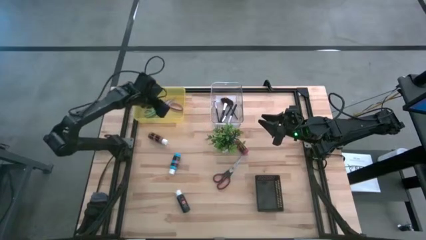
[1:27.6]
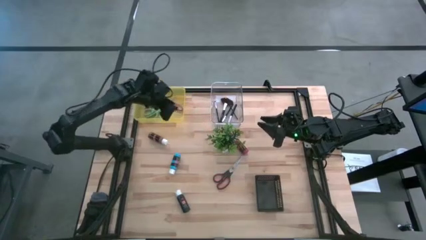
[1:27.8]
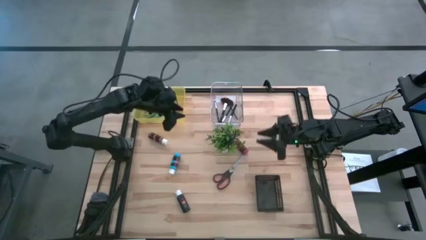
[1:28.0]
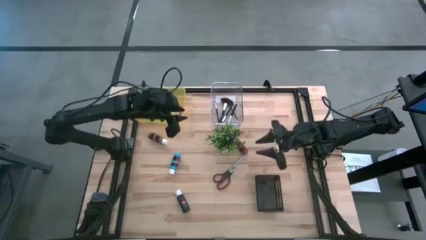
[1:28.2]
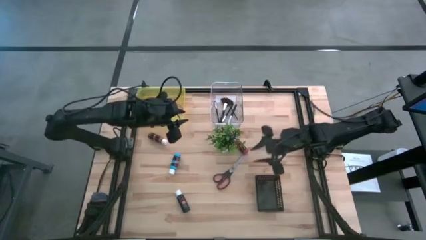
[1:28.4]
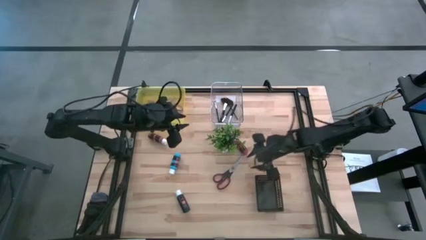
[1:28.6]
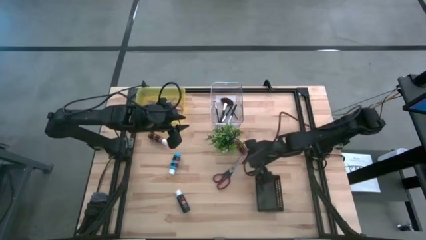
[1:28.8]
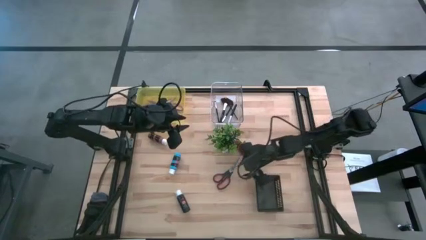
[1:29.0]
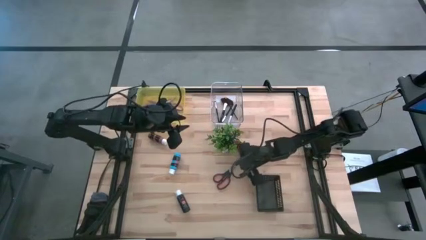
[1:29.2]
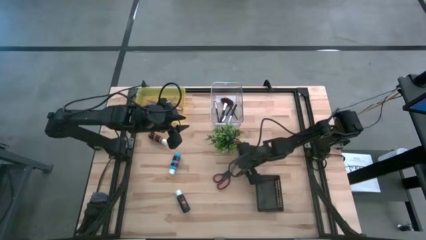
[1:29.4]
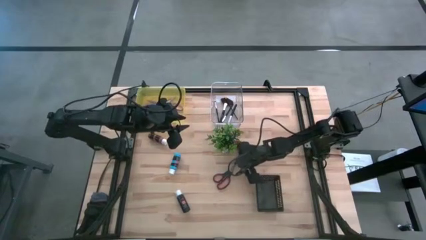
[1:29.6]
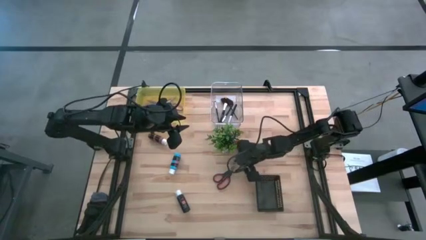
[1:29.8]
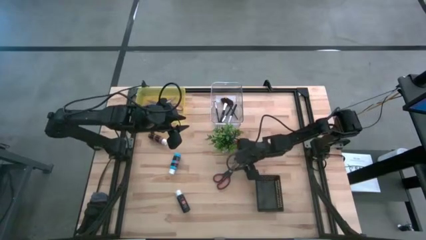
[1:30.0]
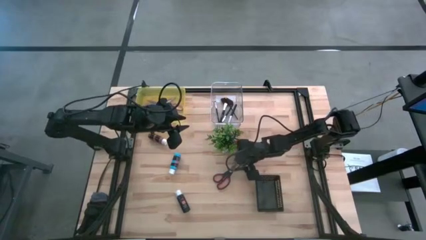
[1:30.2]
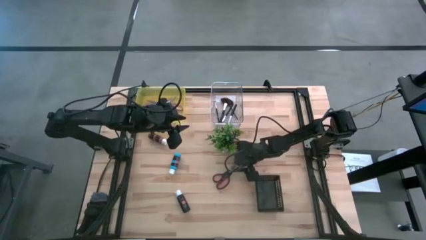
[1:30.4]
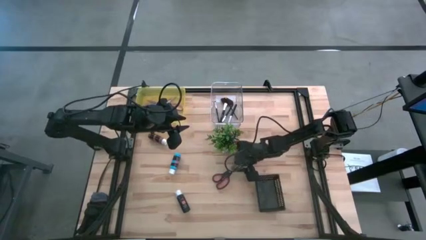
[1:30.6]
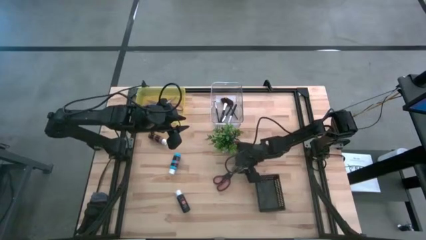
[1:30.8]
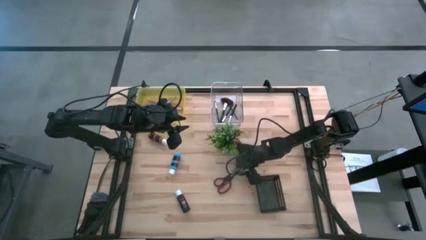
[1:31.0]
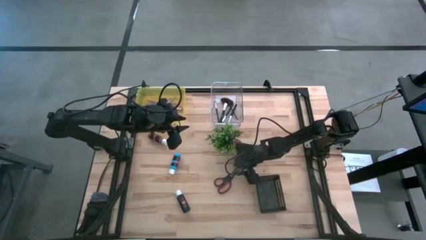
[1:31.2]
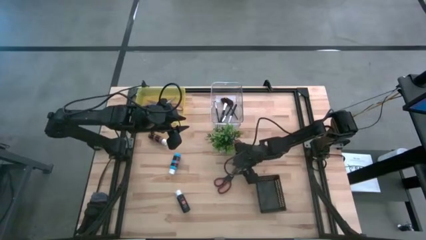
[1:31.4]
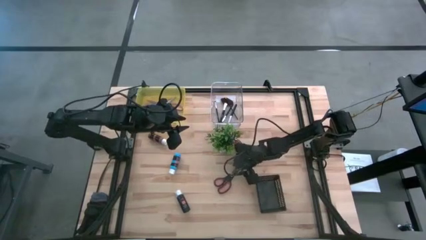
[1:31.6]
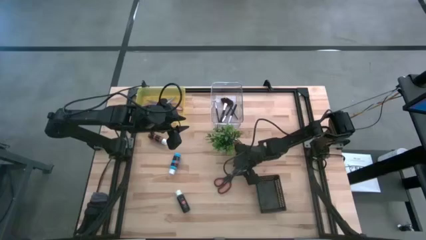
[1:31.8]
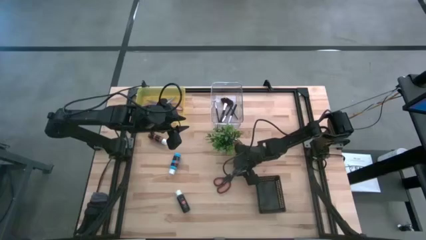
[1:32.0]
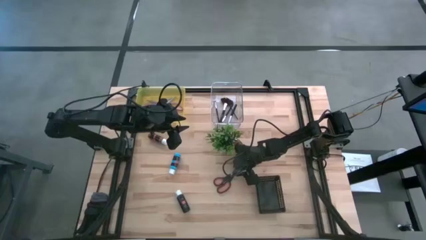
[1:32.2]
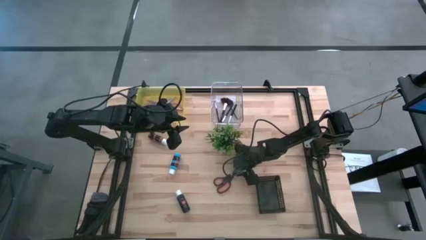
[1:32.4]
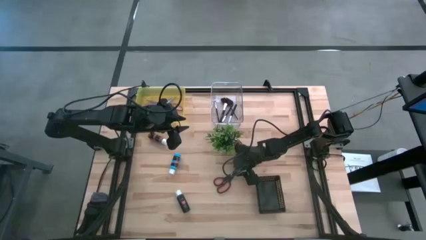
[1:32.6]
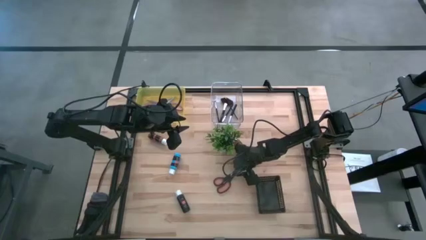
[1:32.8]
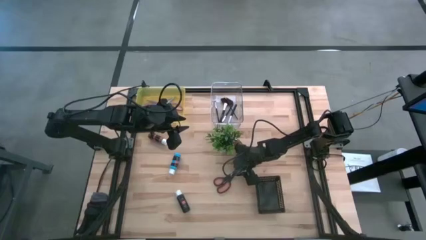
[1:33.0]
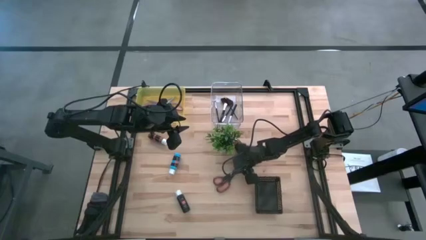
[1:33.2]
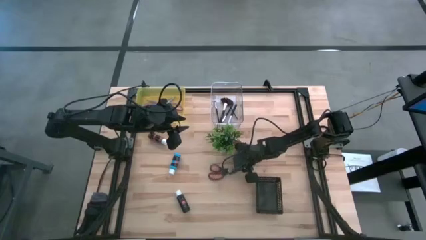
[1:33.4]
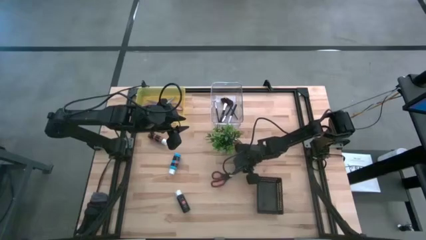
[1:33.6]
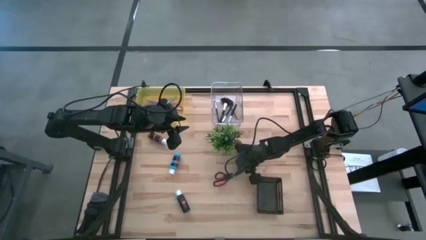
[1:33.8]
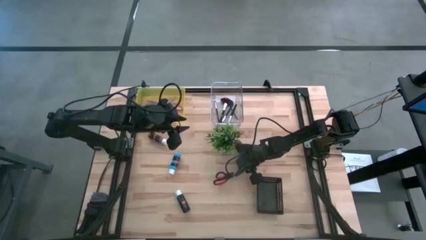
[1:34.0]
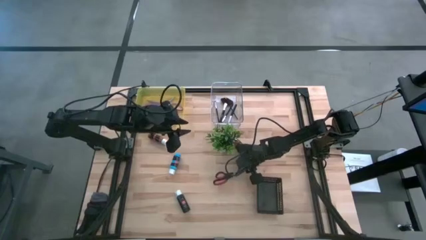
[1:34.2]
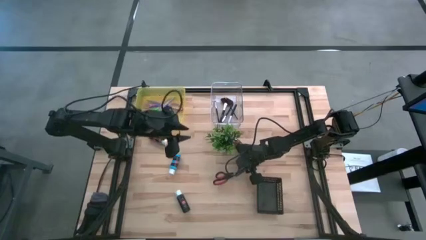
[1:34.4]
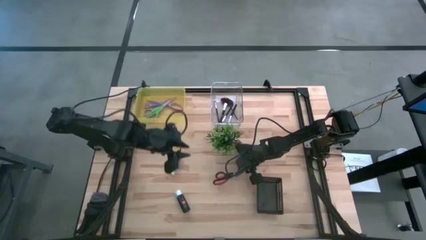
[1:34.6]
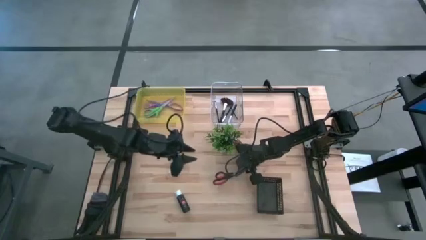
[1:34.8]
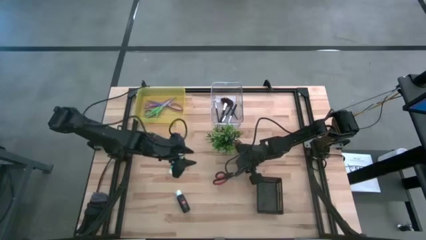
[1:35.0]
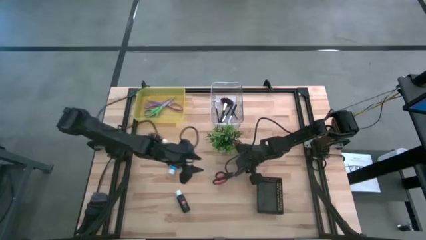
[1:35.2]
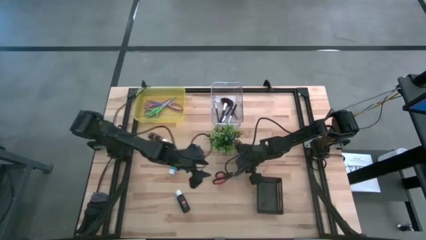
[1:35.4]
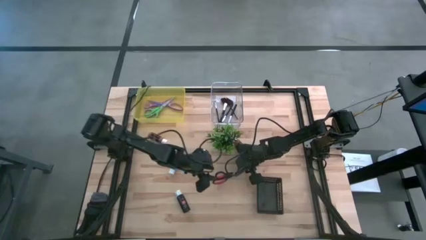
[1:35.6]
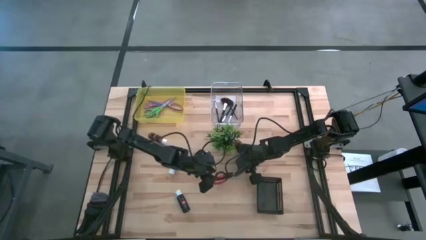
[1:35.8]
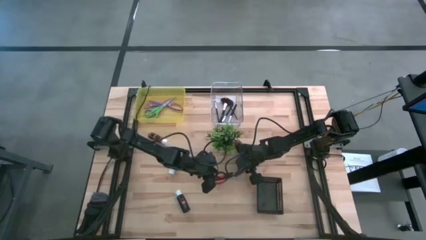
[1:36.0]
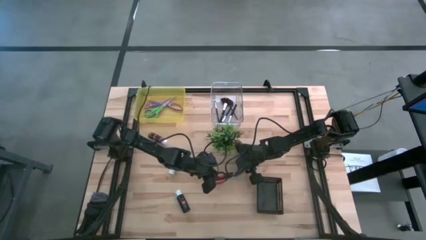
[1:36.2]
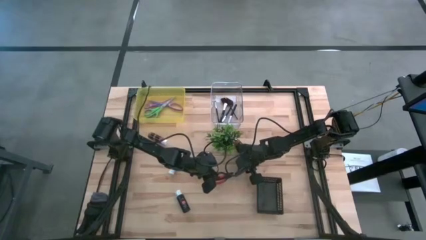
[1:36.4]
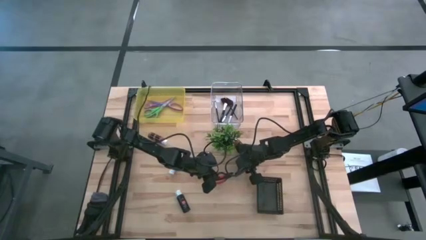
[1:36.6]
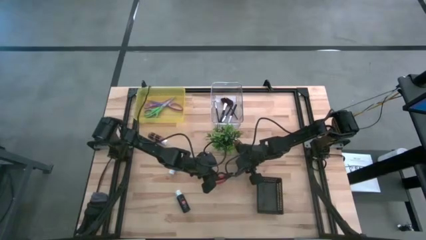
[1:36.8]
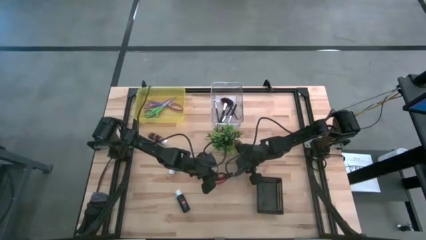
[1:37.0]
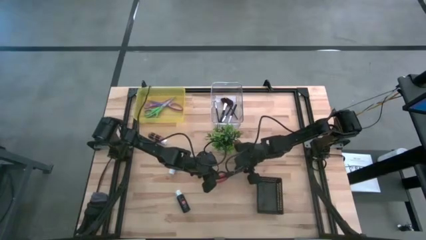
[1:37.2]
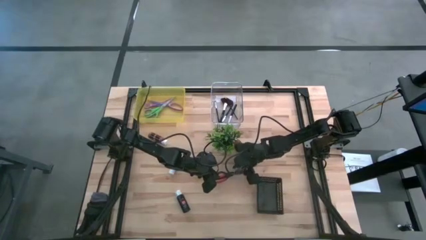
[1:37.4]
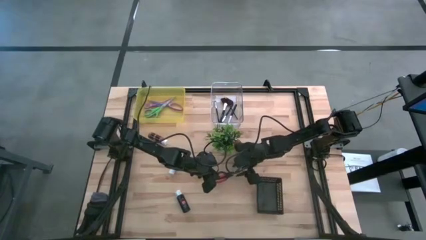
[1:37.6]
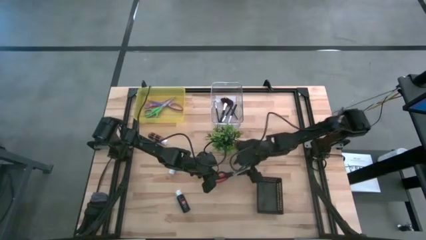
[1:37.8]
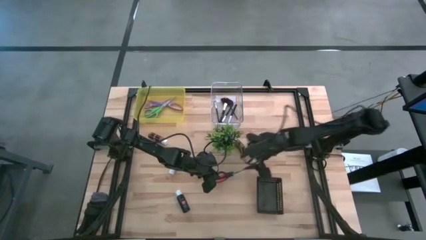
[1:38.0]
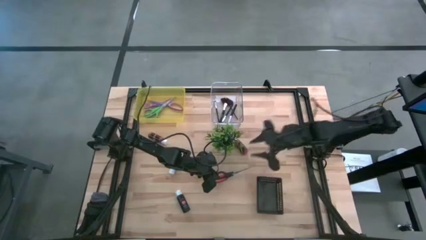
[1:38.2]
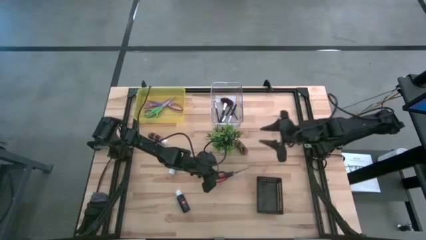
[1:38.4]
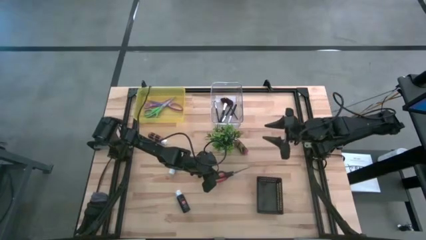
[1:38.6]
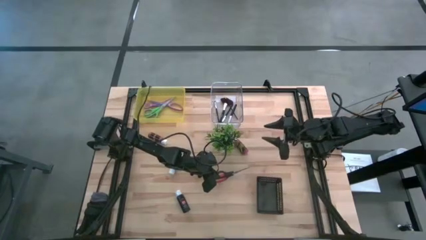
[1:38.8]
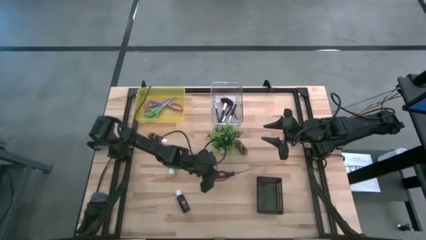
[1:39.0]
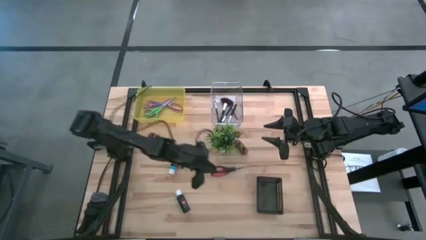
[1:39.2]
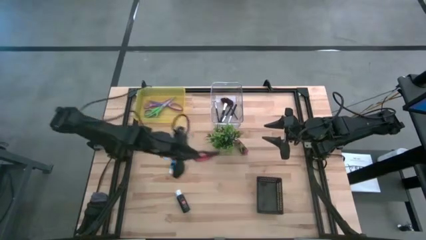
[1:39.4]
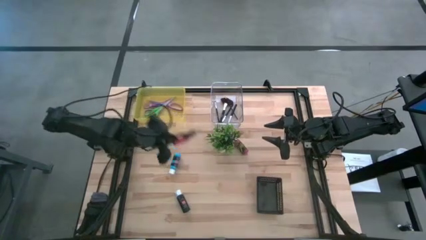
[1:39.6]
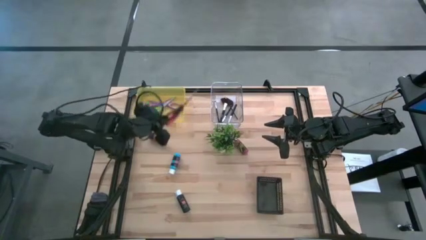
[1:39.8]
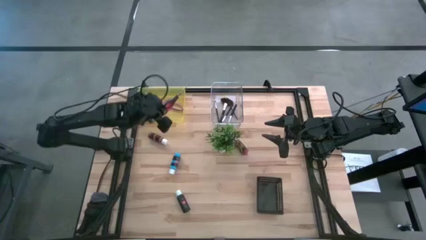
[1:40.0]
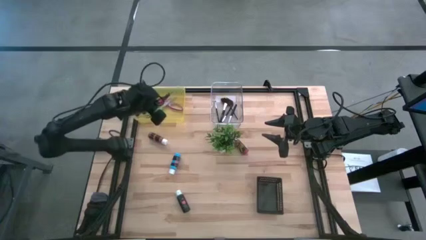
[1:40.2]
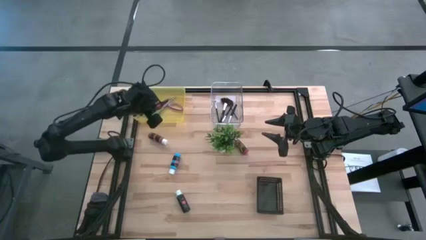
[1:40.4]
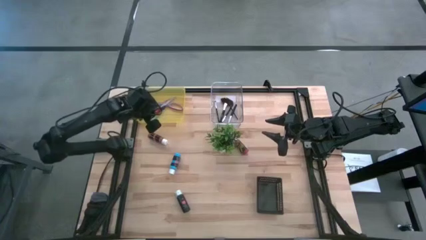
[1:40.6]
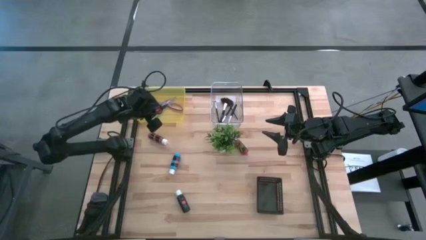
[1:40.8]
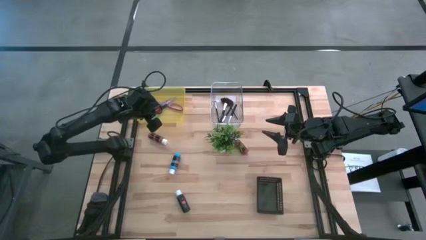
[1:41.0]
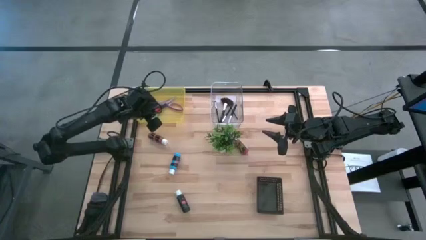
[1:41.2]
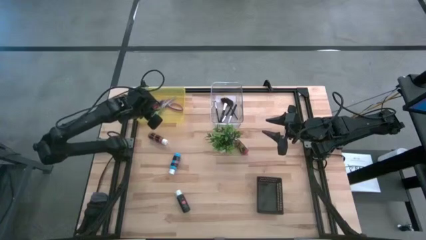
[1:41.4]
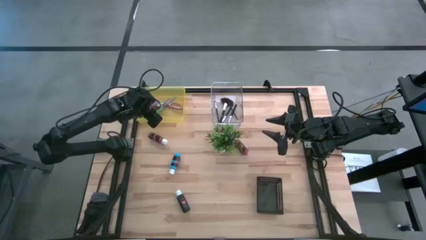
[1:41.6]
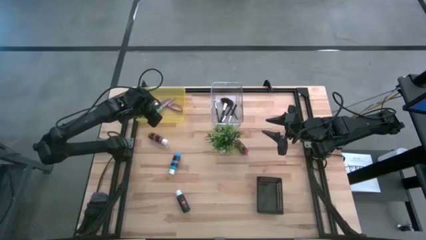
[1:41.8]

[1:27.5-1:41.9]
Task: Pick & Place Paint Supplies
Put the black scissors into the yellow bin
